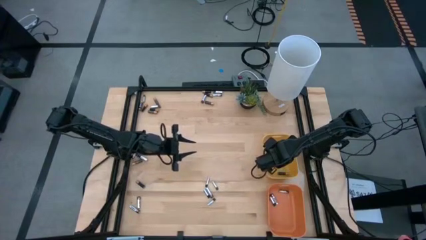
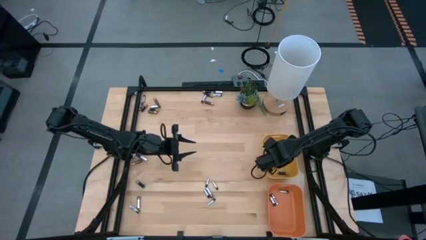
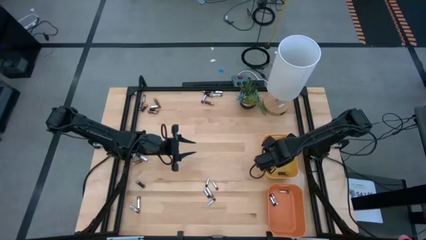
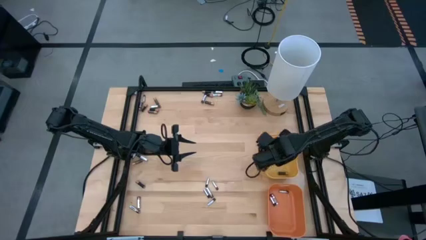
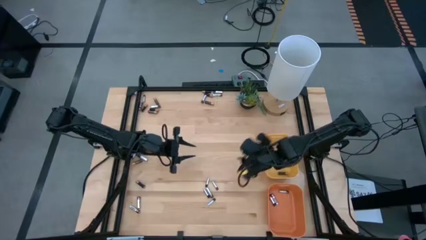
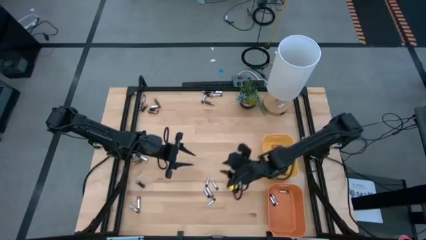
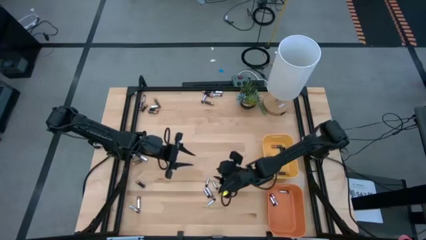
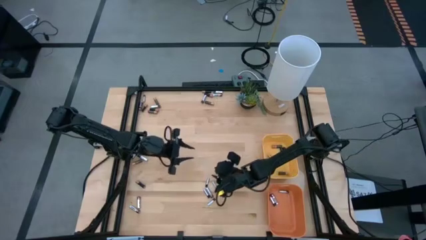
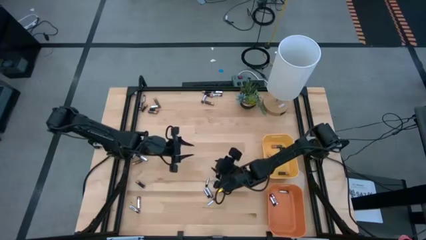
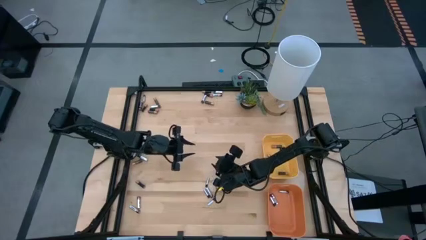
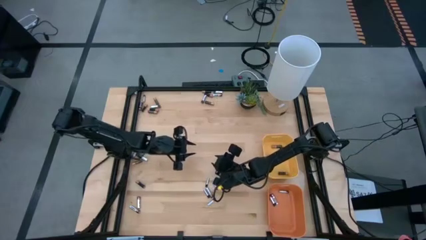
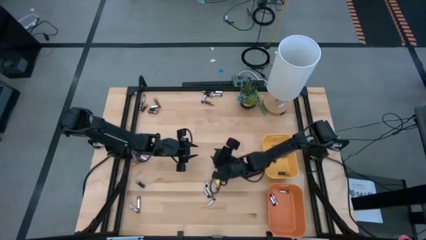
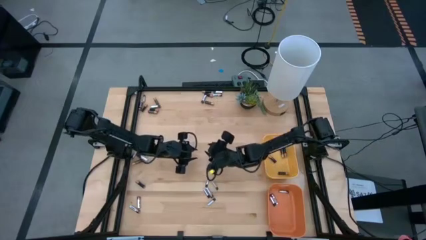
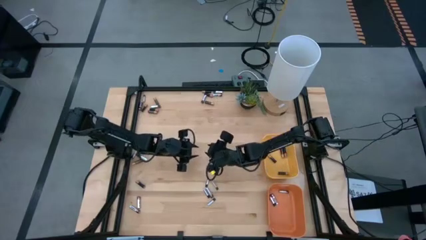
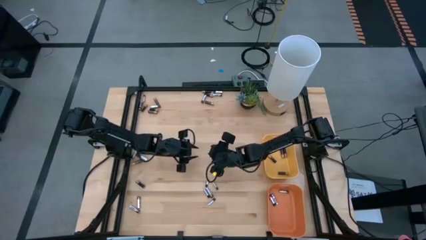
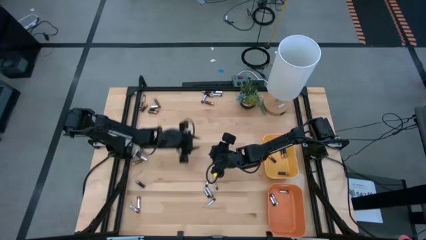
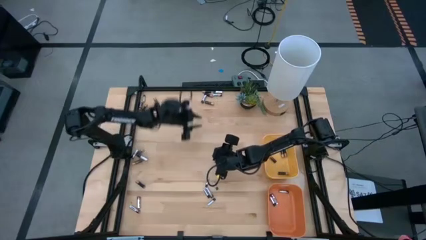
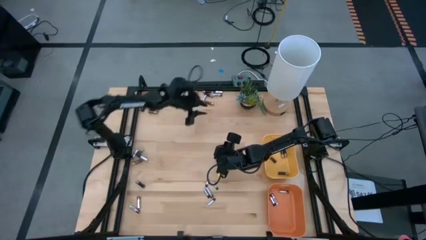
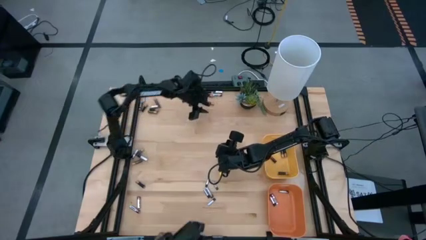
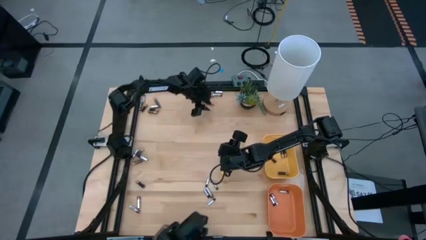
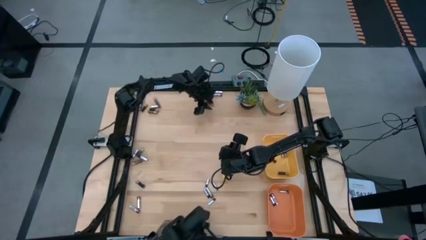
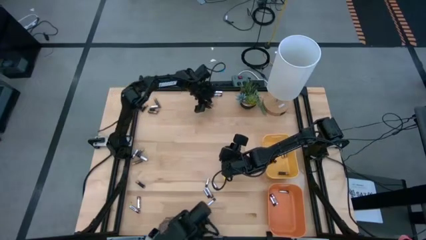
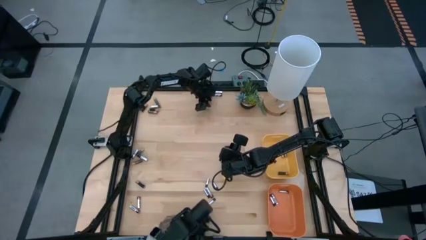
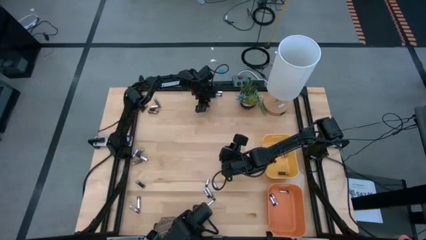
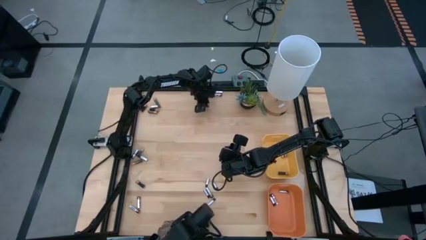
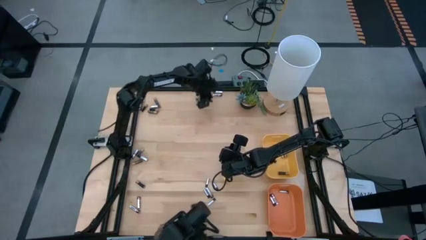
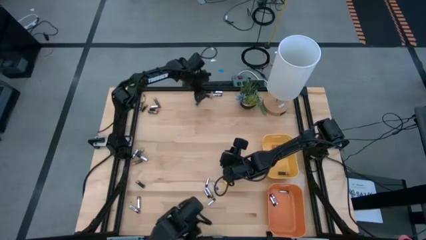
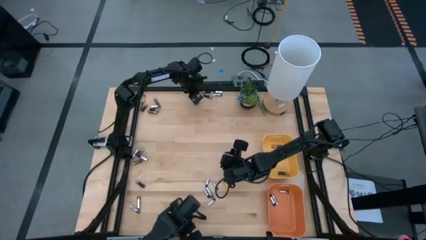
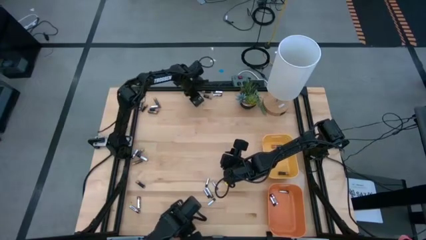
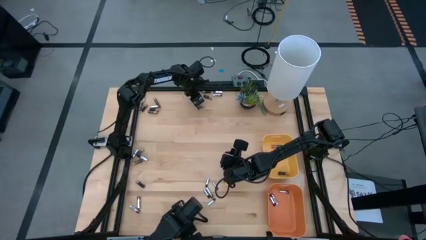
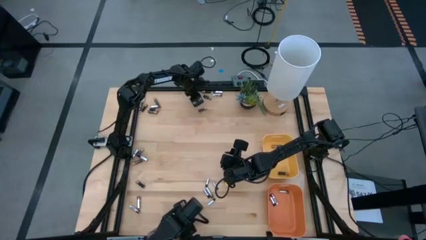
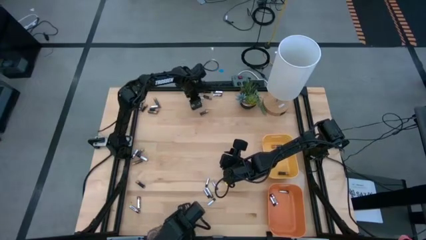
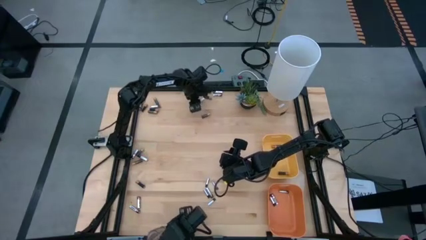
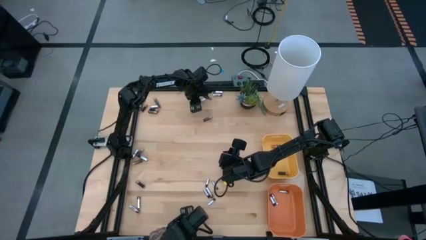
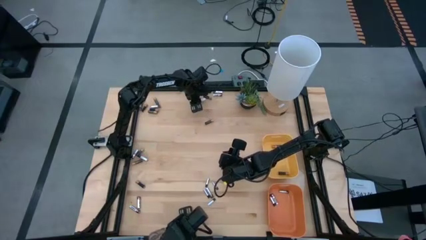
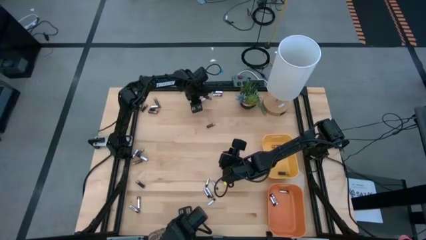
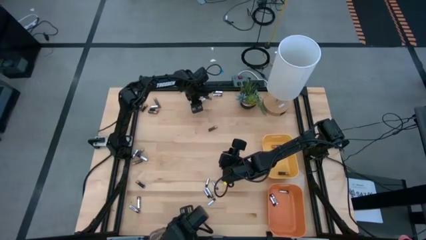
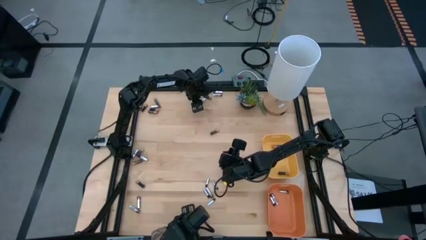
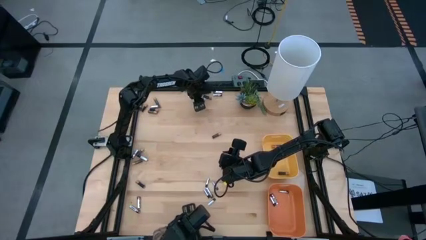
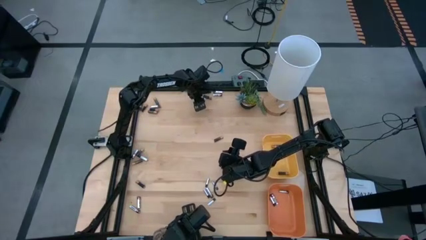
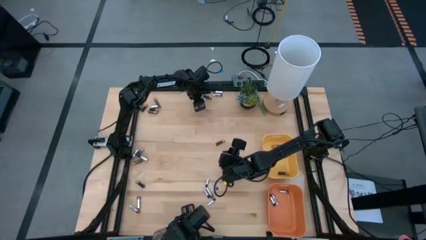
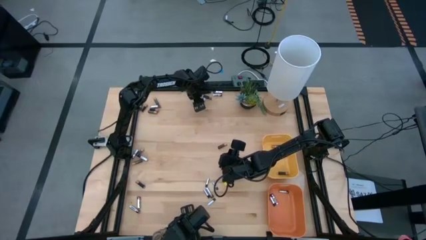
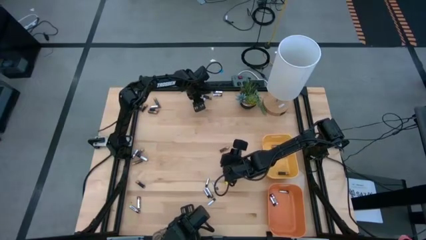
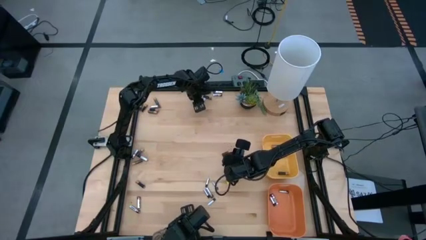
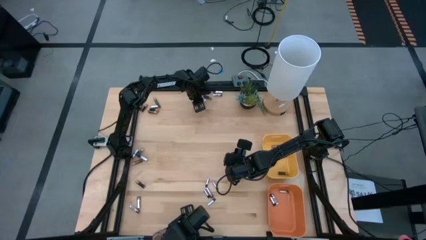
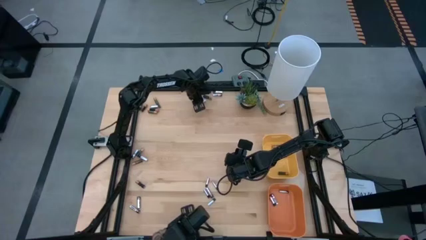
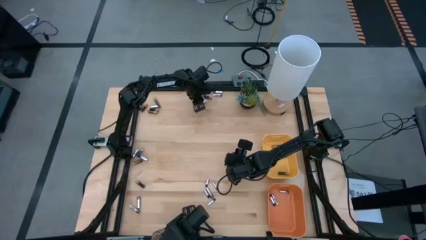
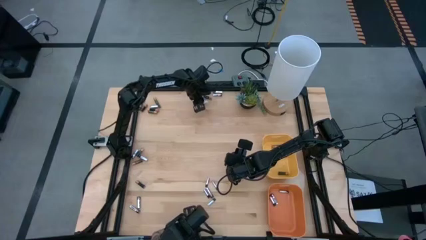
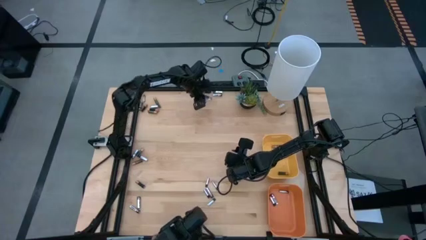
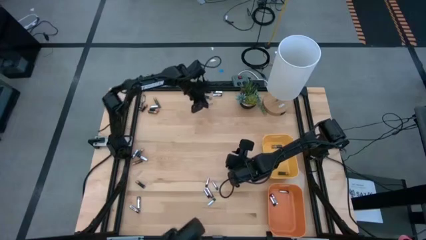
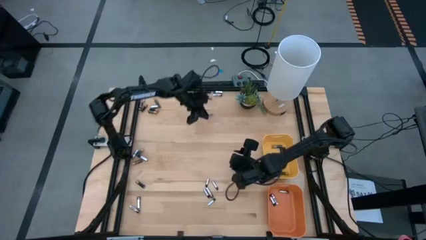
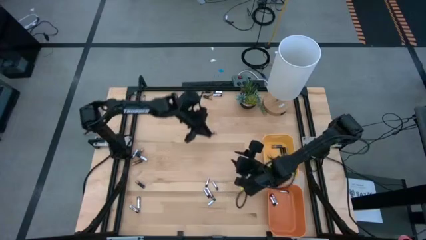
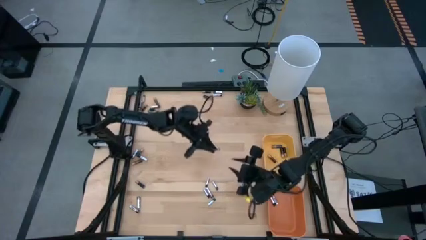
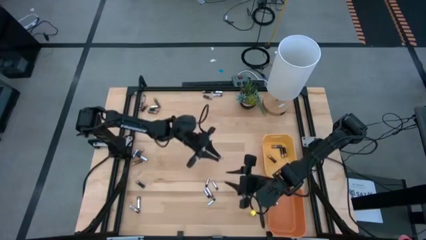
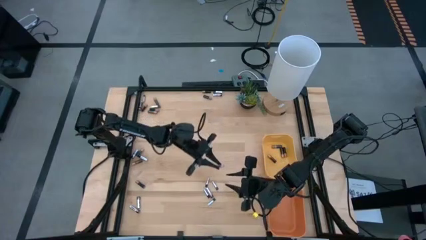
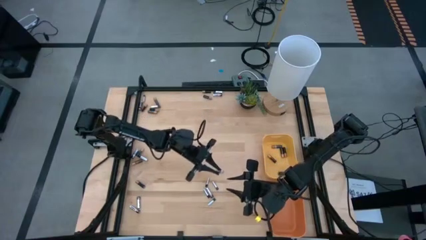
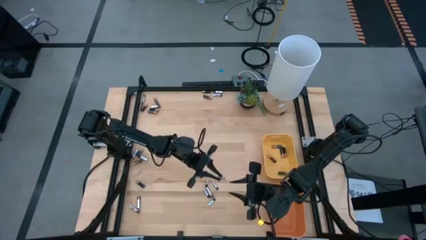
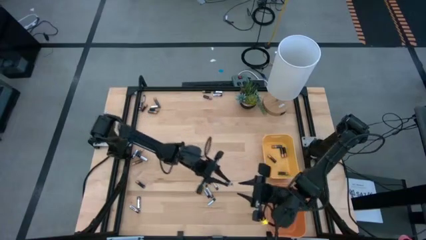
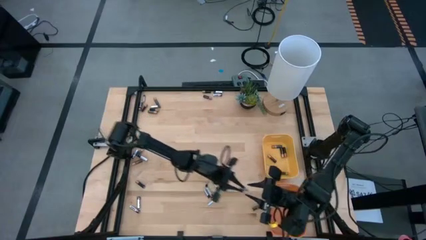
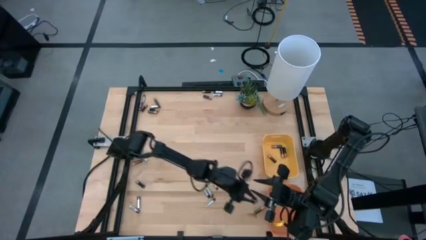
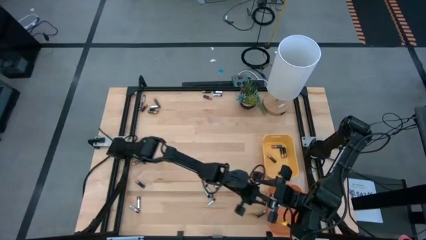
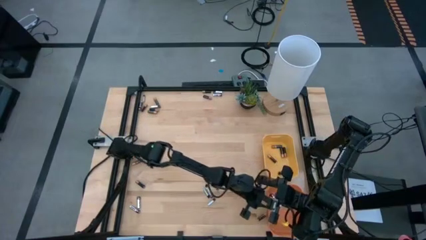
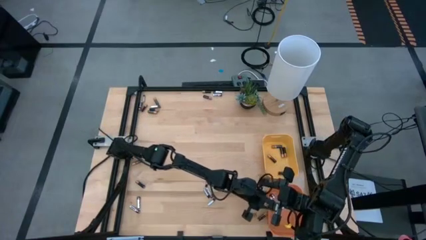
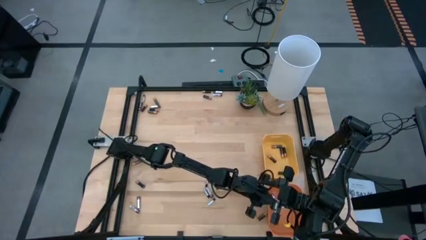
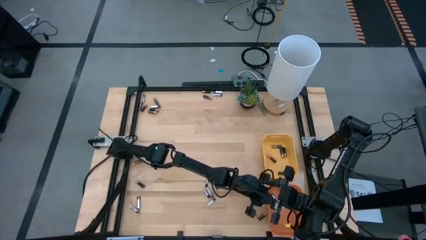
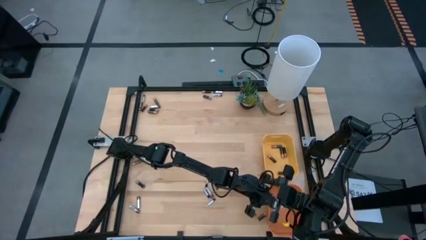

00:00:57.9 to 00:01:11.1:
Task: Sort batteries
Put the black battery into the orange bin

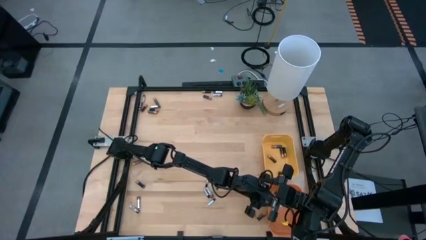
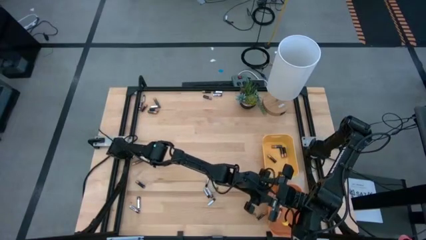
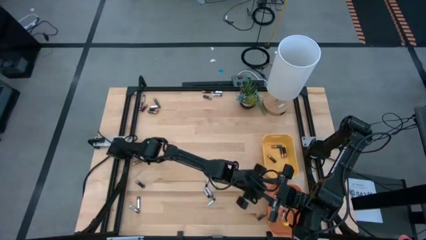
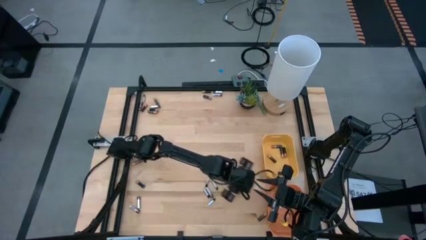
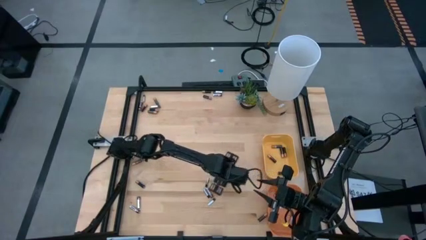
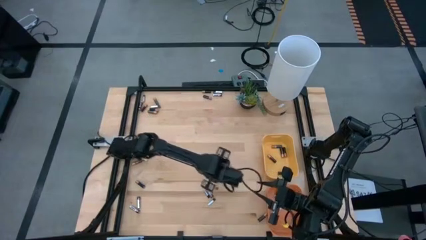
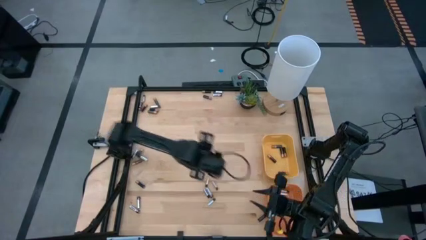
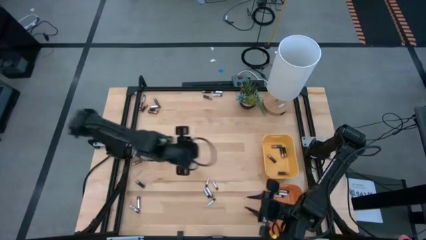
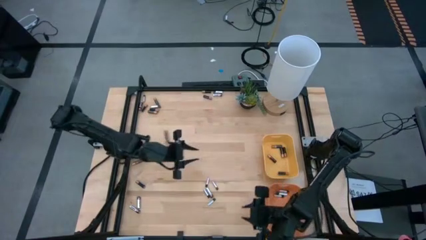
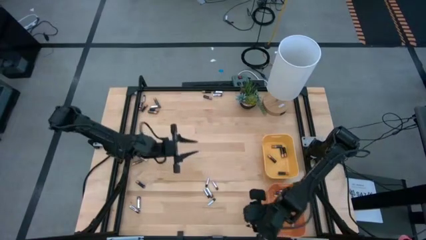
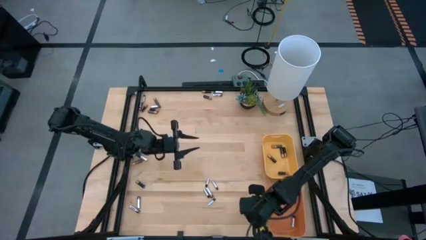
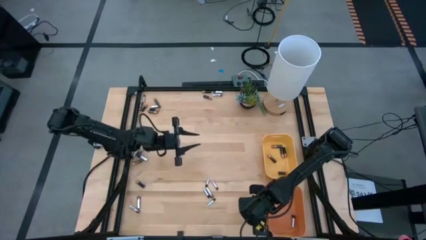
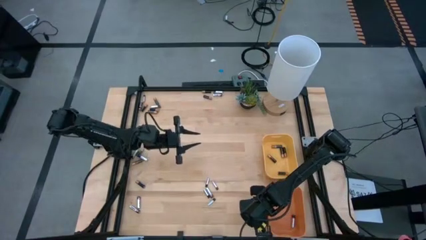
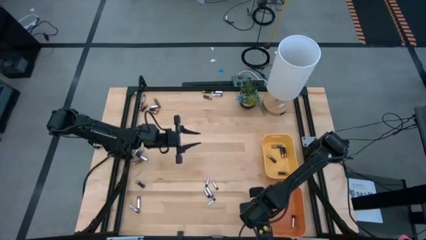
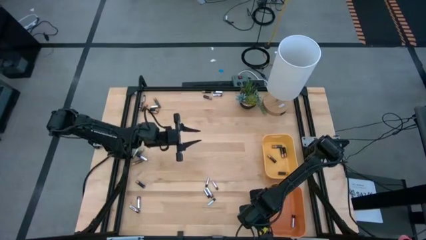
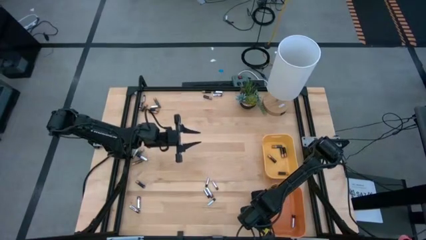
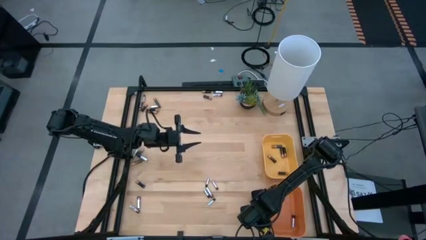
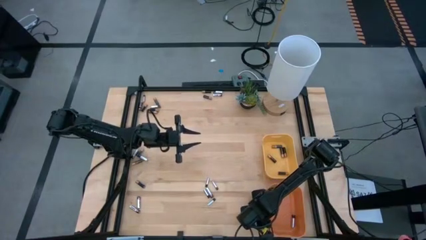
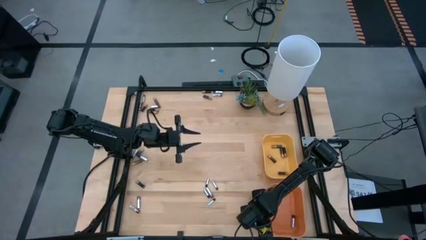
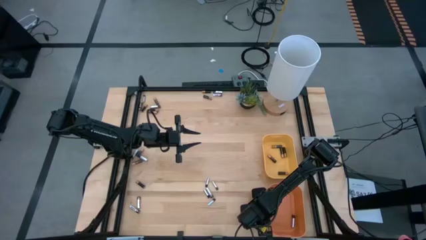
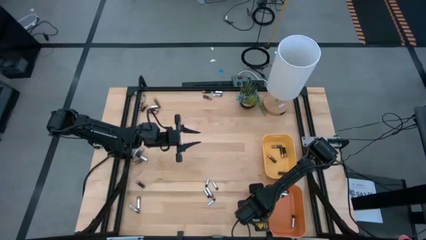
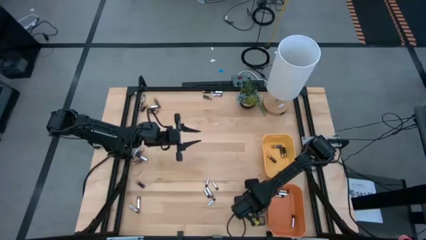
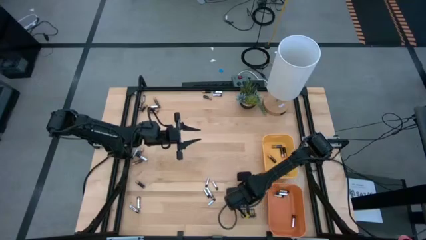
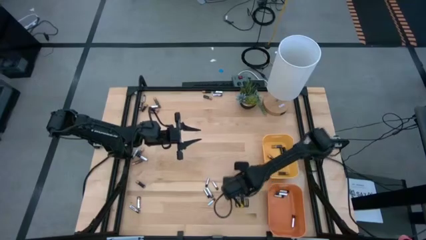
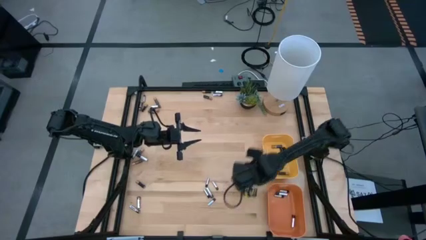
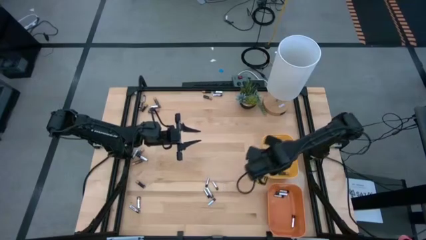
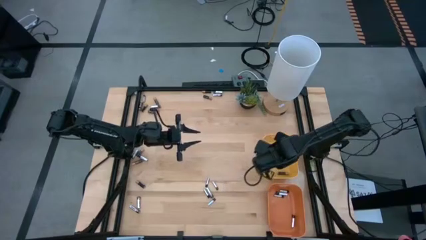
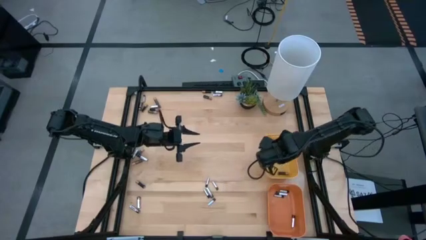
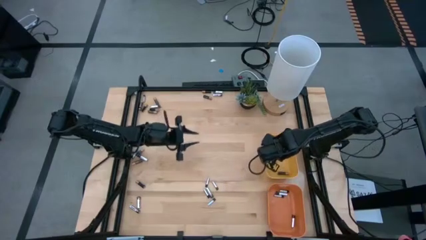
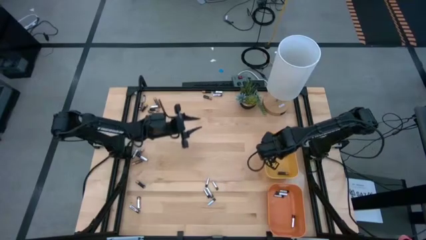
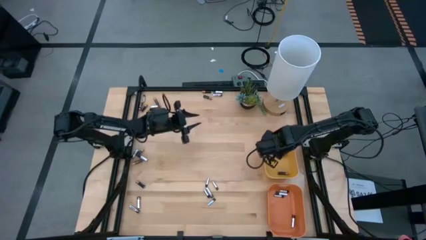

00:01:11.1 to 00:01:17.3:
Put the brown battery into the yellow bin
